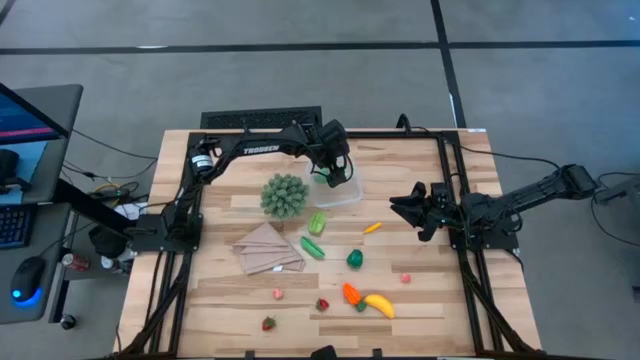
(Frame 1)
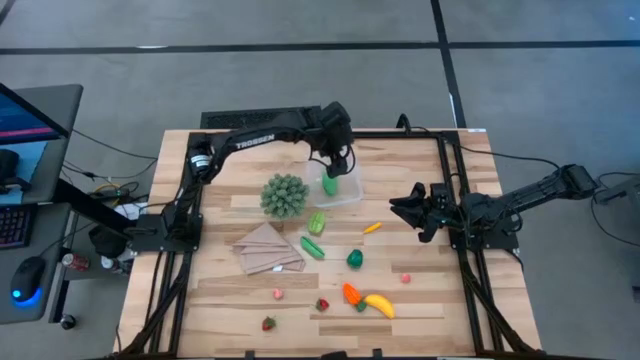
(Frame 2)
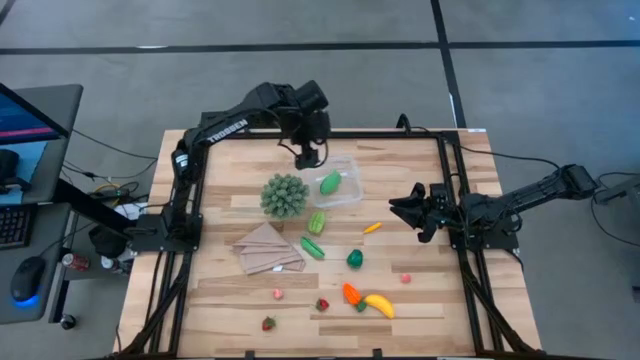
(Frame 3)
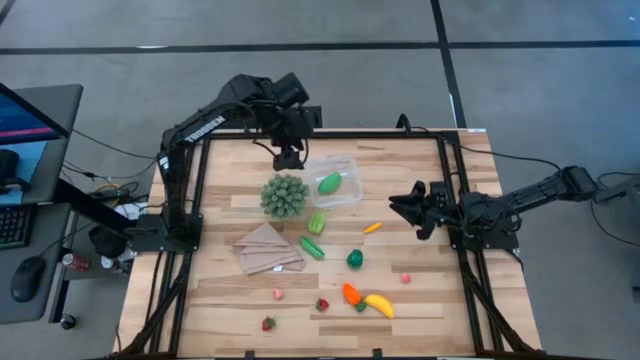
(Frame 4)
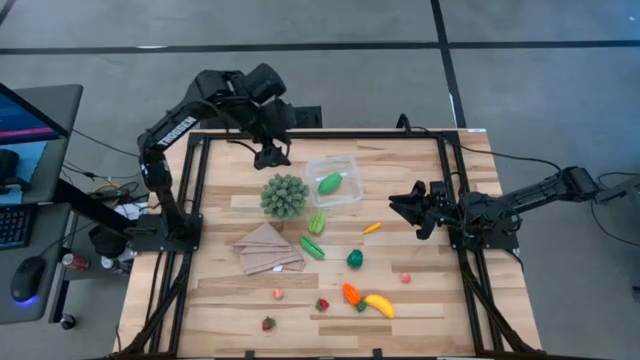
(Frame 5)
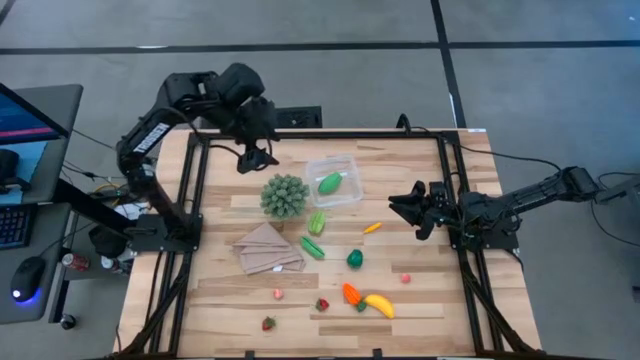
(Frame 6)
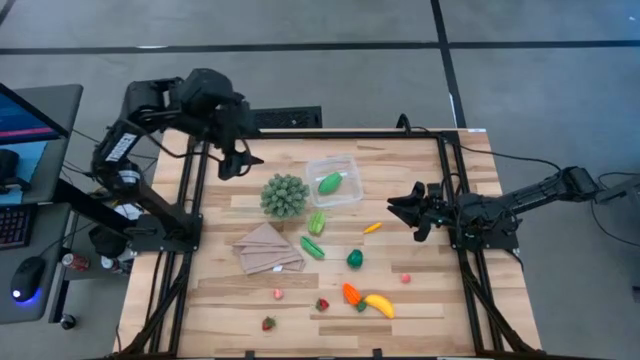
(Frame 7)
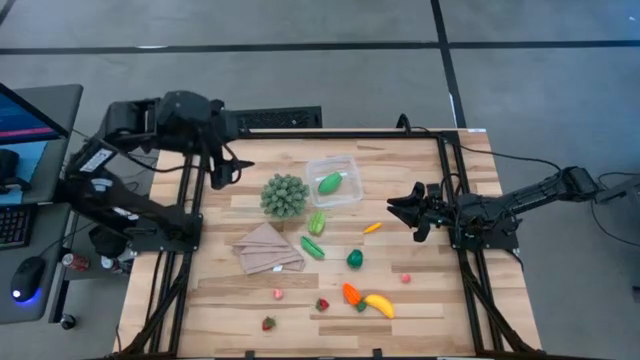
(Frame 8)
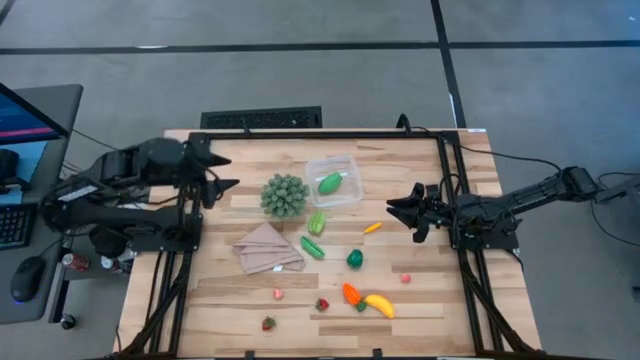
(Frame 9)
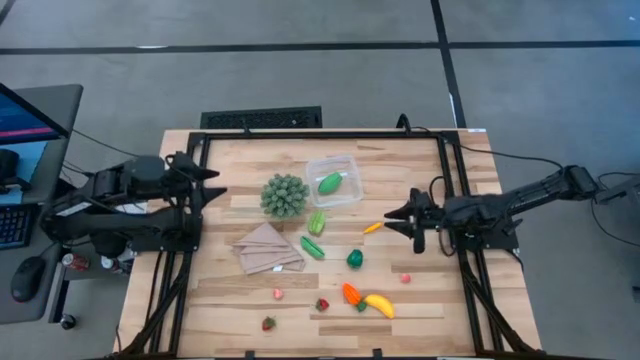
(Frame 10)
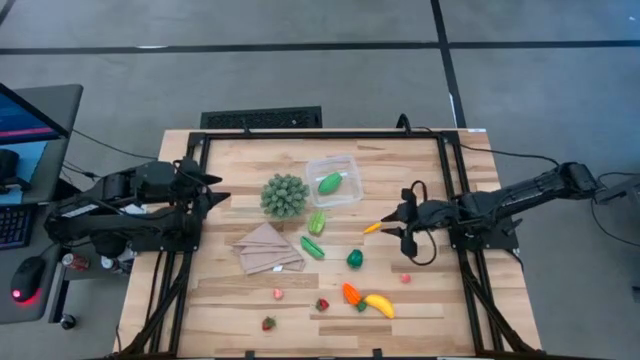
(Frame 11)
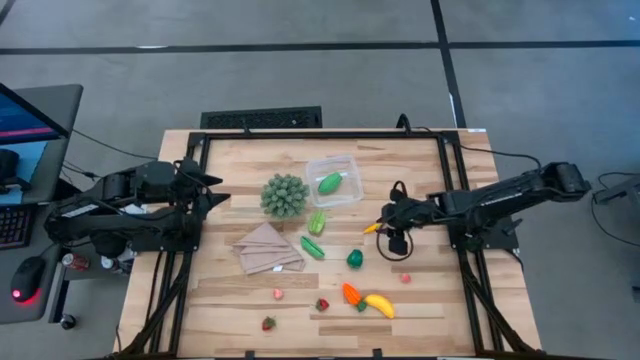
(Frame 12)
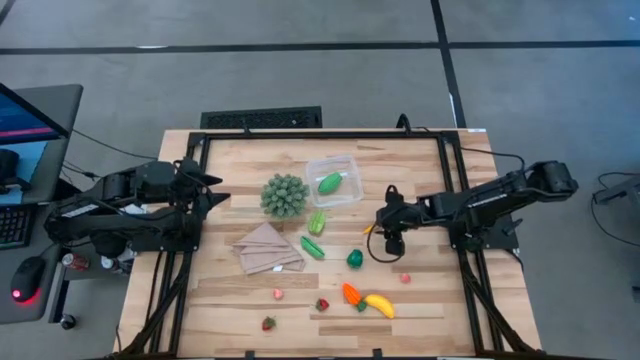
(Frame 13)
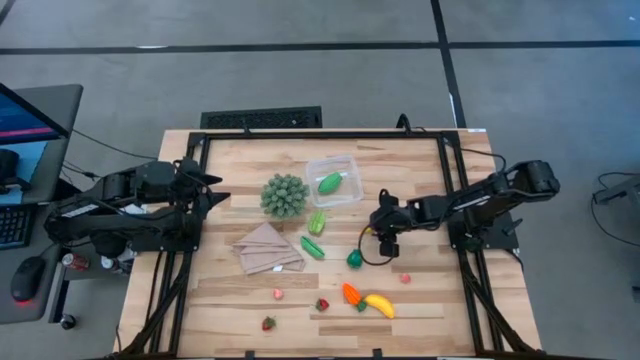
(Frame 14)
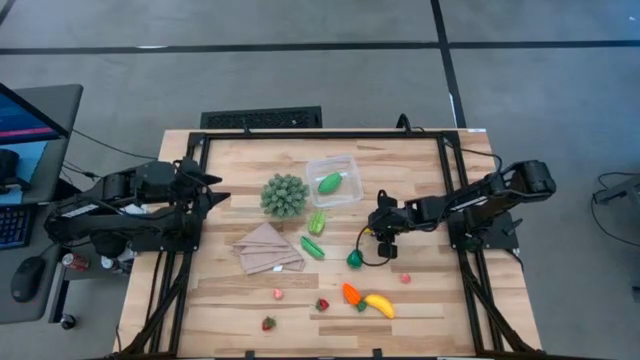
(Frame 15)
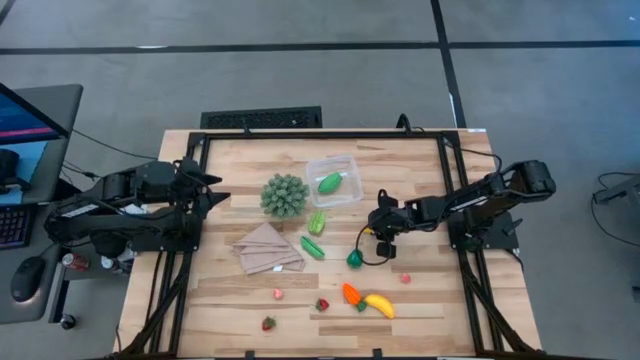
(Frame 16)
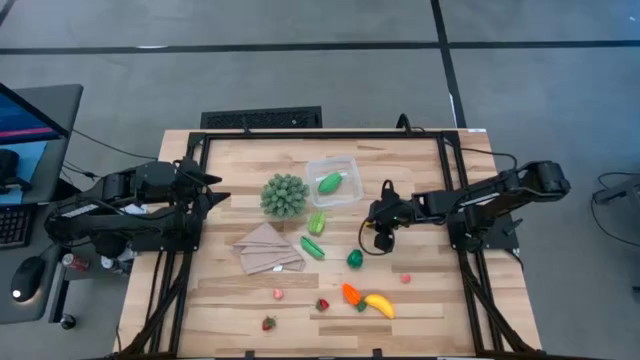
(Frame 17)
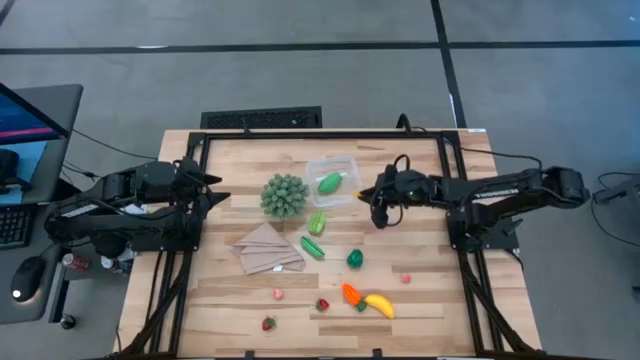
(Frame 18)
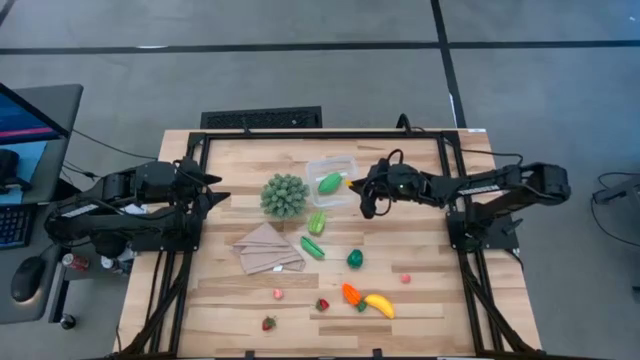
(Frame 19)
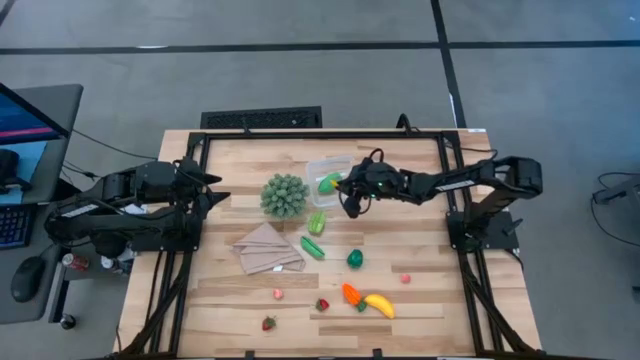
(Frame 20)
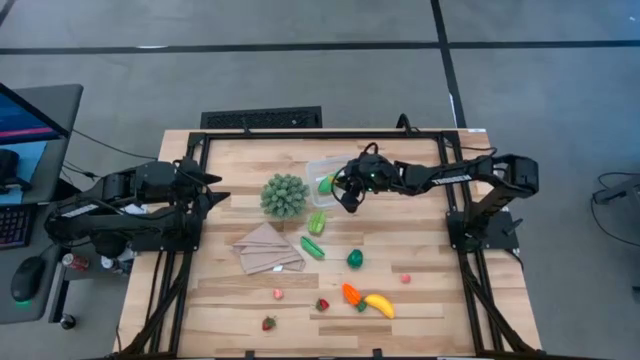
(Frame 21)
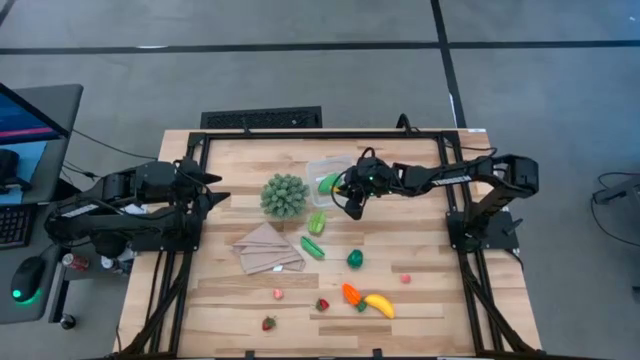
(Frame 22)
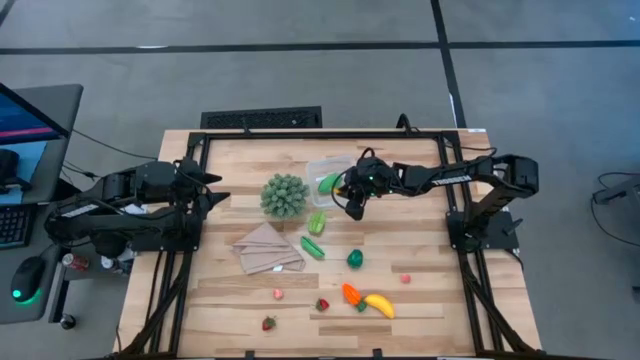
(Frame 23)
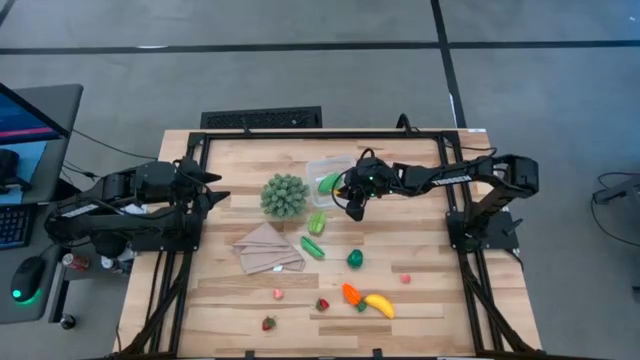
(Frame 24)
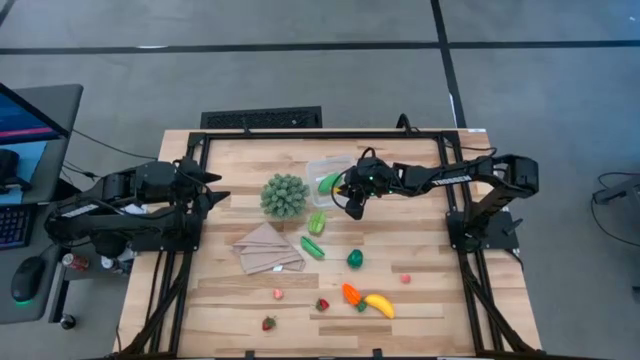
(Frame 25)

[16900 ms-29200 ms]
Task: Pick and placing Produce into tupperware
Put the yellow pepper into the transparent bin

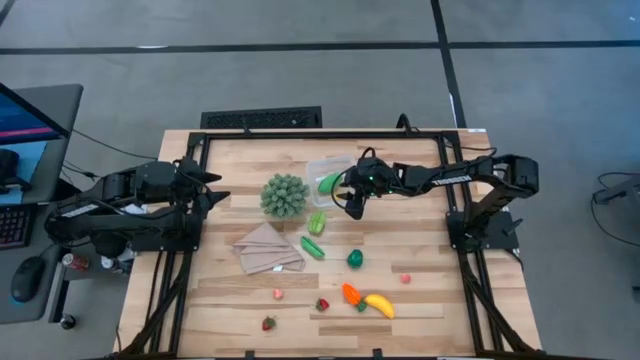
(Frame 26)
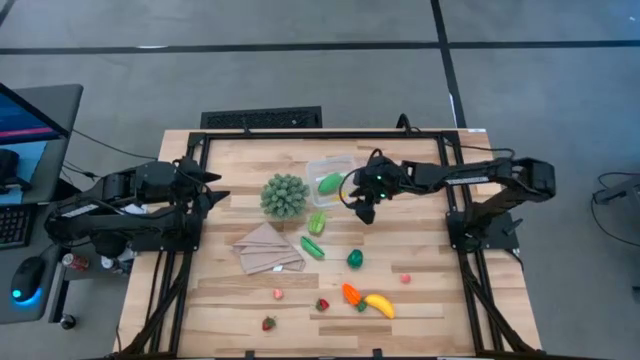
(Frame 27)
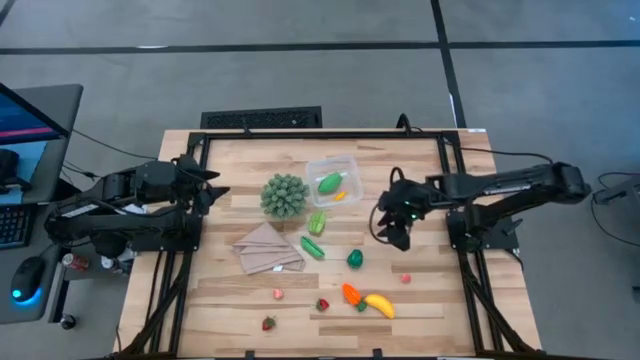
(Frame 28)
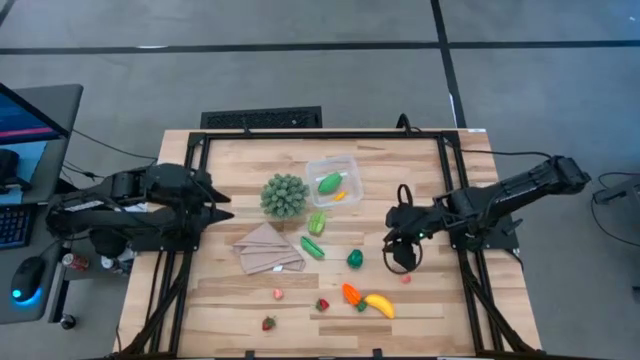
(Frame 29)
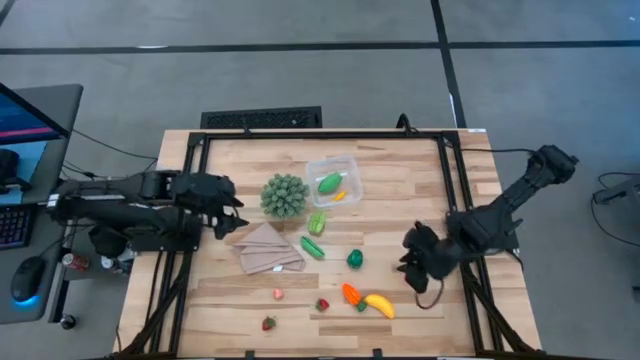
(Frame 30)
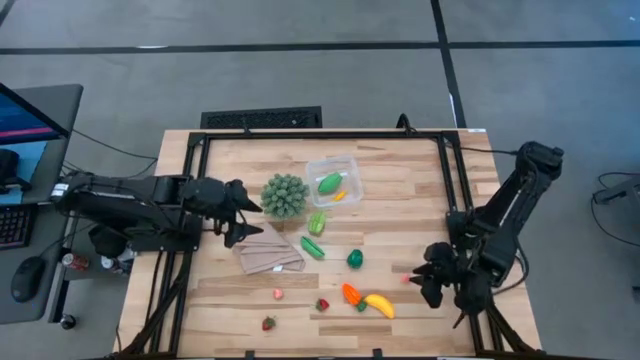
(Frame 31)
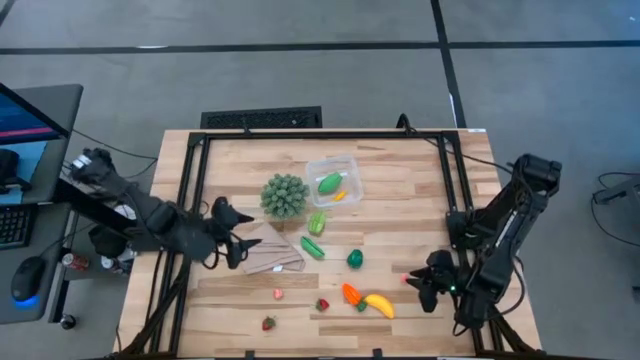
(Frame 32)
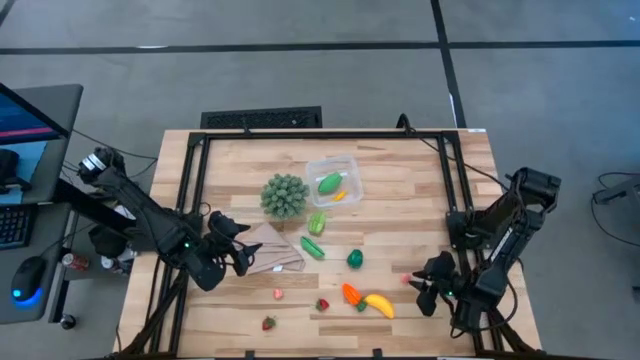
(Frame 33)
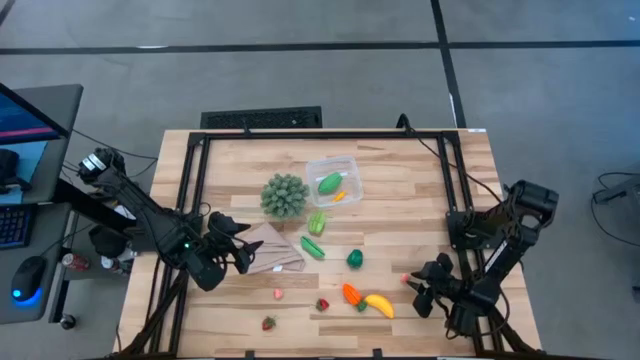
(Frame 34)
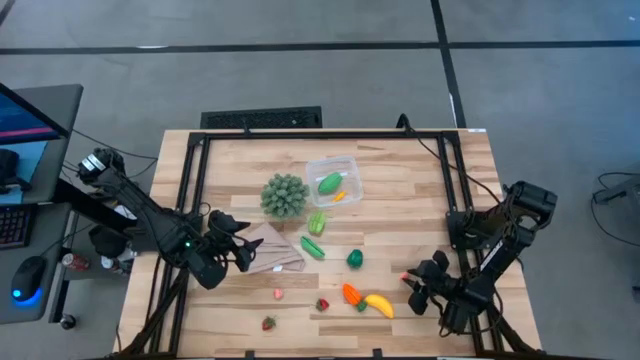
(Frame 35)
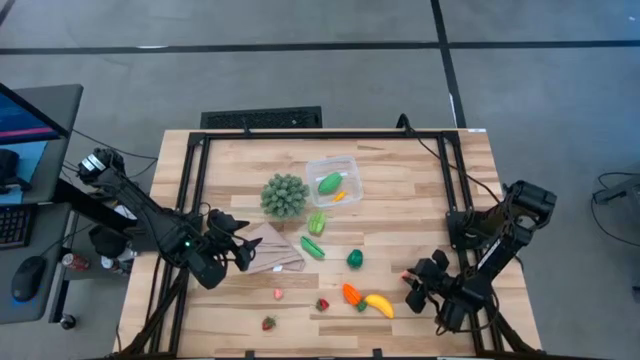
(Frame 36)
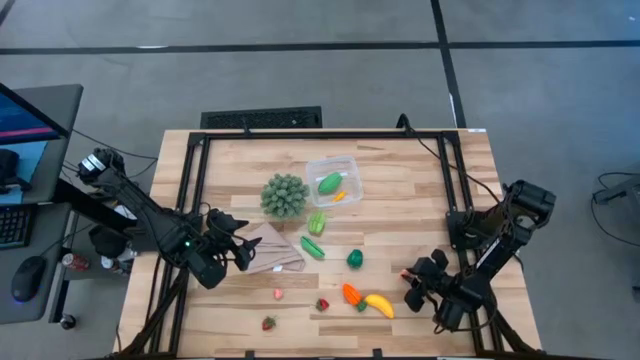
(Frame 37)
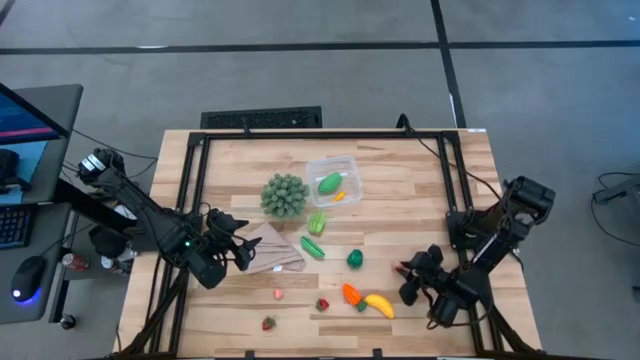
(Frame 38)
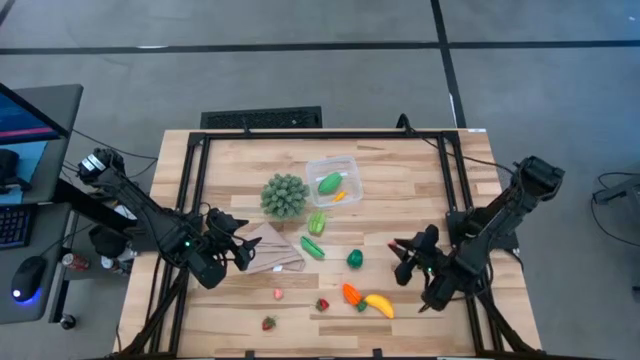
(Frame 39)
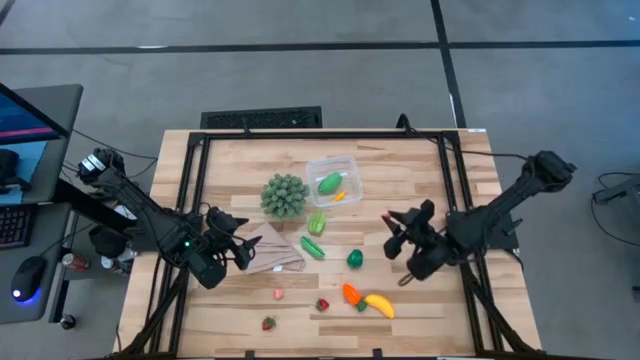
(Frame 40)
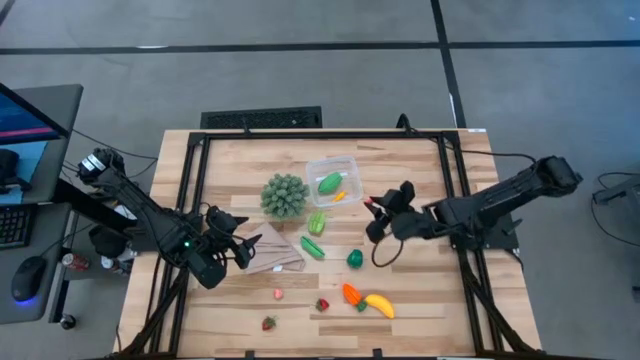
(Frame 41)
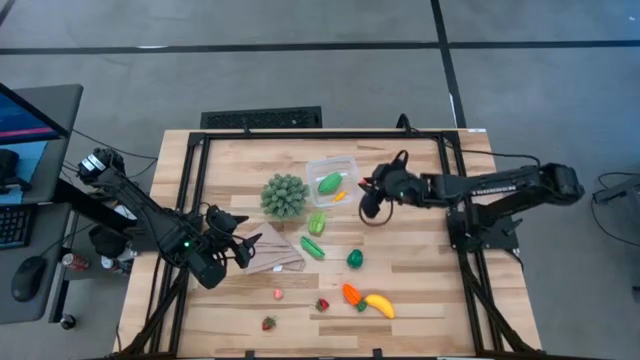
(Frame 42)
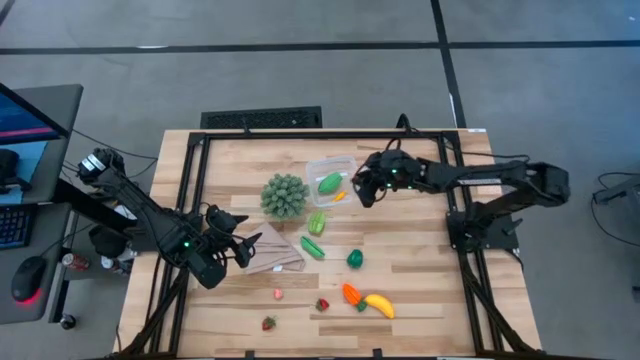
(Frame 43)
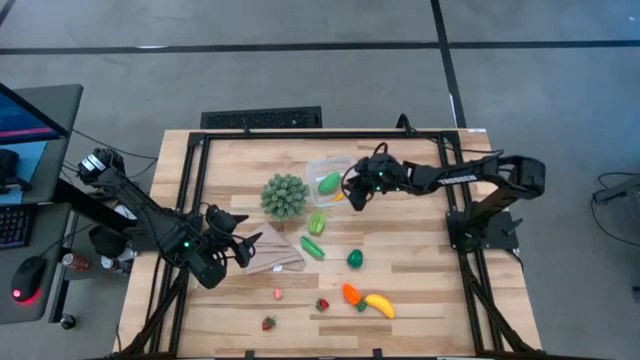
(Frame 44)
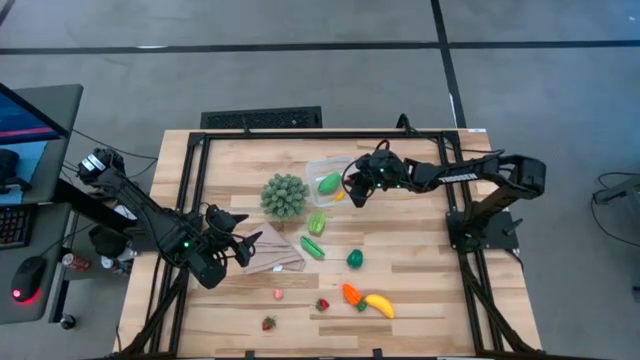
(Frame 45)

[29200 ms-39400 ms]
Put the right pink peach into the transparent bin
